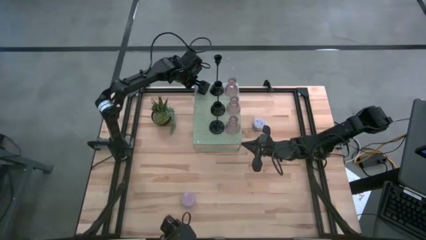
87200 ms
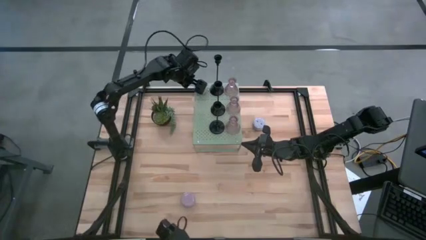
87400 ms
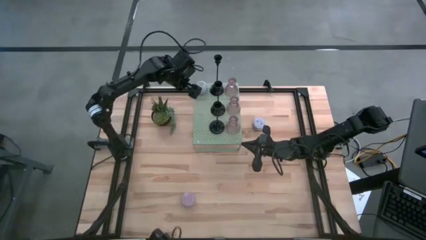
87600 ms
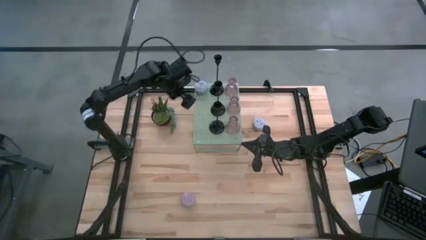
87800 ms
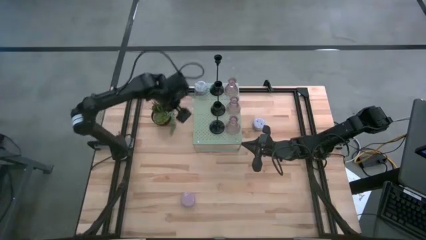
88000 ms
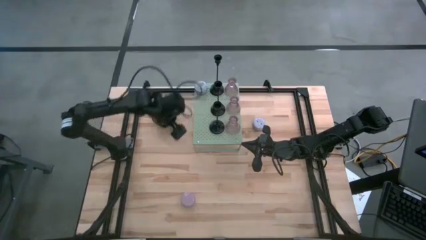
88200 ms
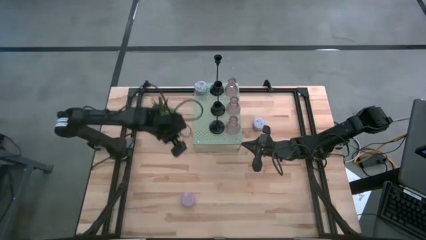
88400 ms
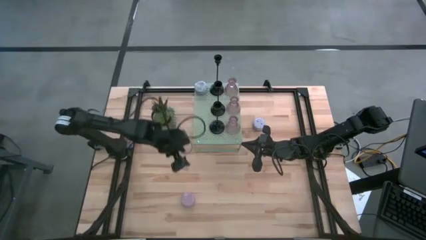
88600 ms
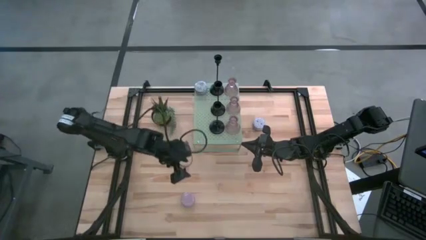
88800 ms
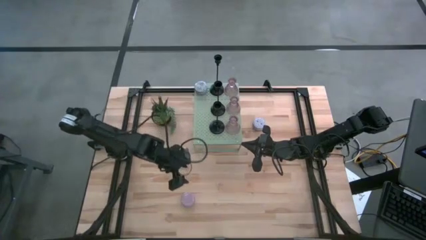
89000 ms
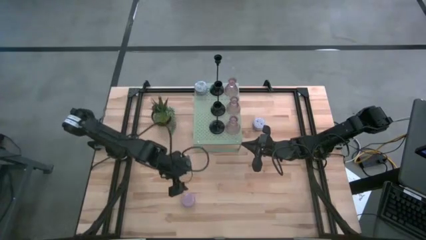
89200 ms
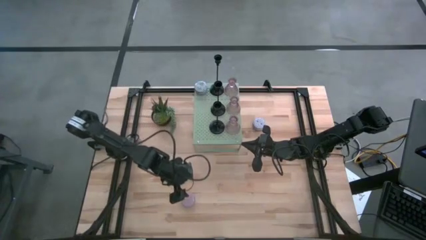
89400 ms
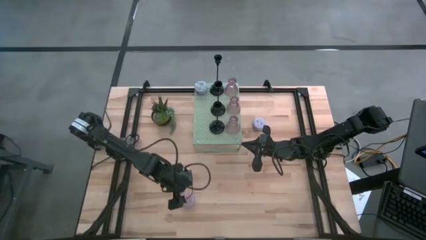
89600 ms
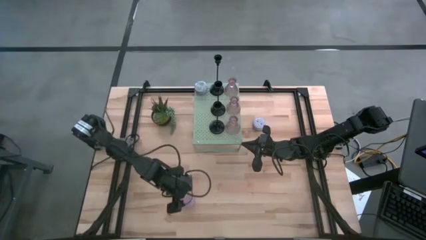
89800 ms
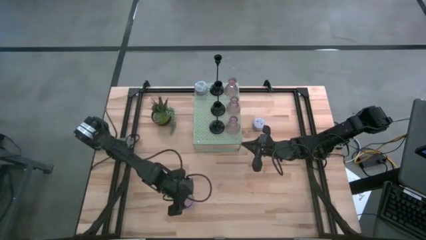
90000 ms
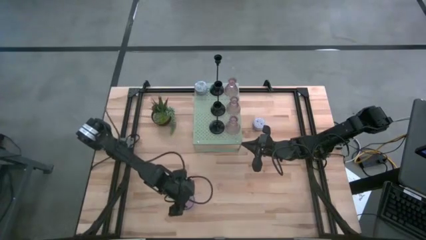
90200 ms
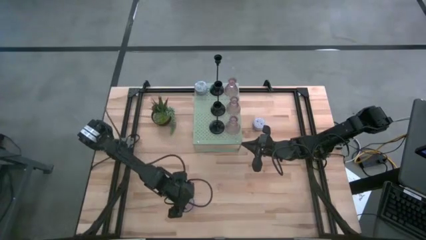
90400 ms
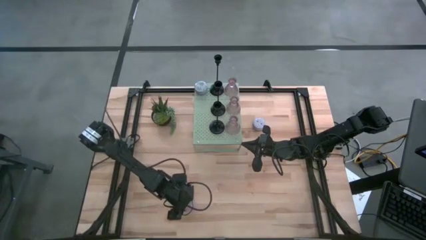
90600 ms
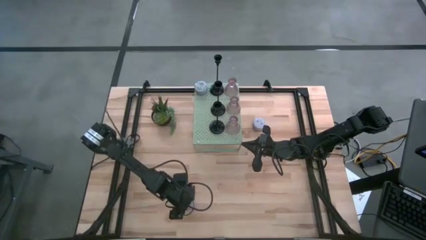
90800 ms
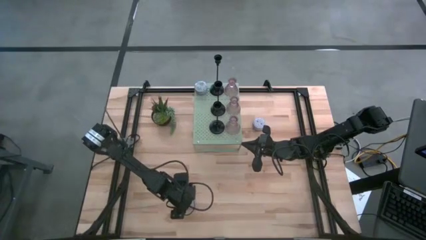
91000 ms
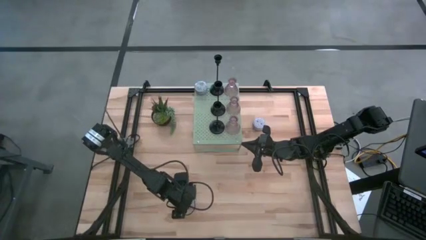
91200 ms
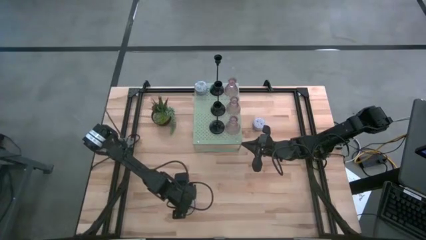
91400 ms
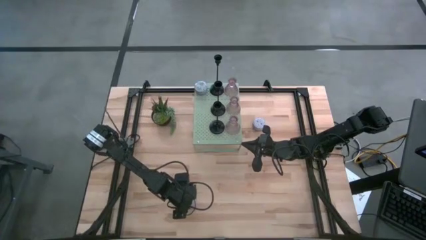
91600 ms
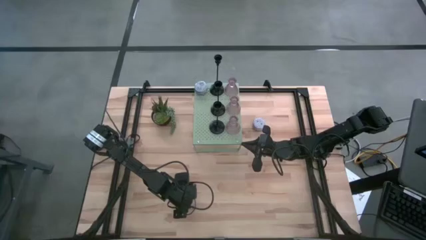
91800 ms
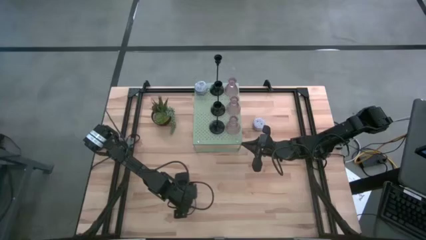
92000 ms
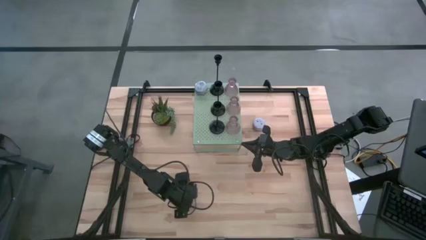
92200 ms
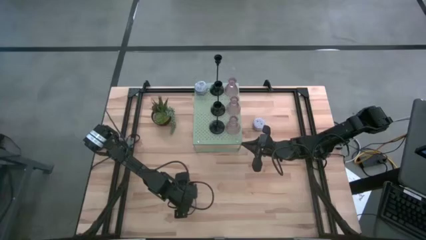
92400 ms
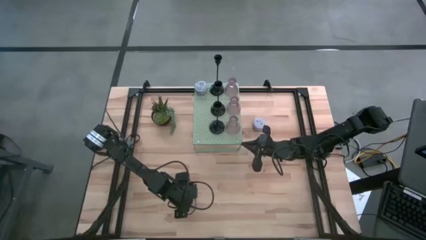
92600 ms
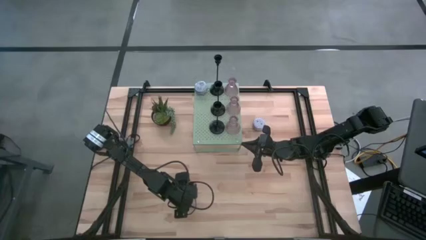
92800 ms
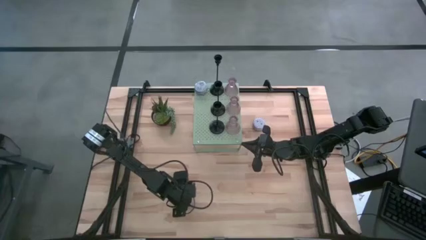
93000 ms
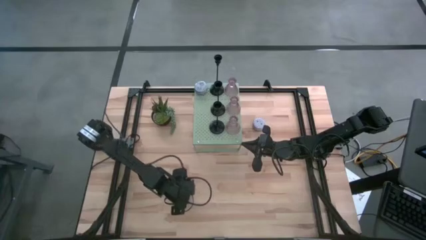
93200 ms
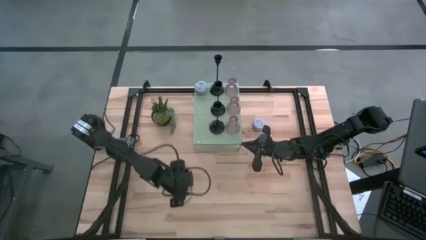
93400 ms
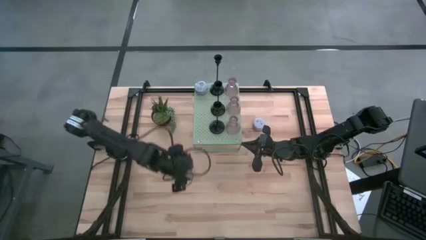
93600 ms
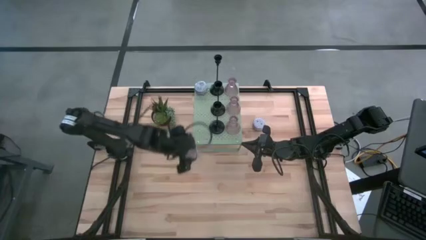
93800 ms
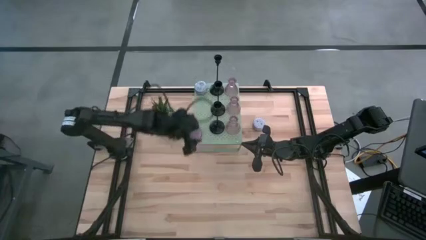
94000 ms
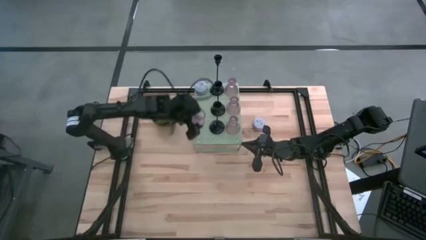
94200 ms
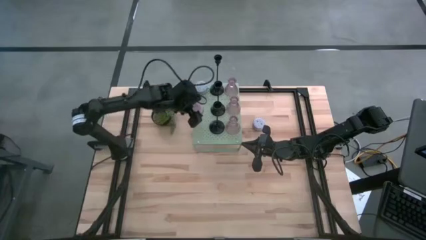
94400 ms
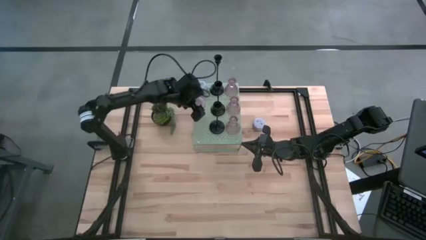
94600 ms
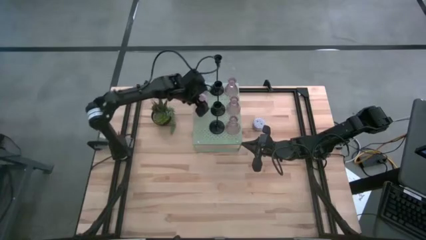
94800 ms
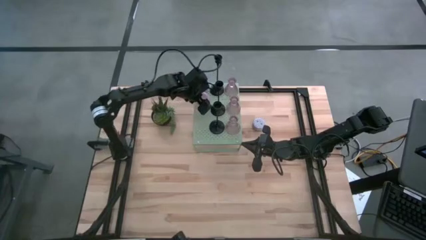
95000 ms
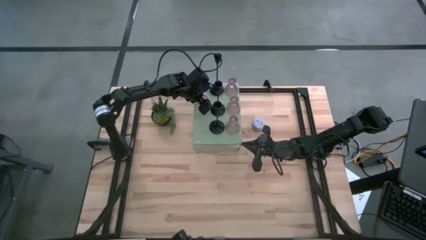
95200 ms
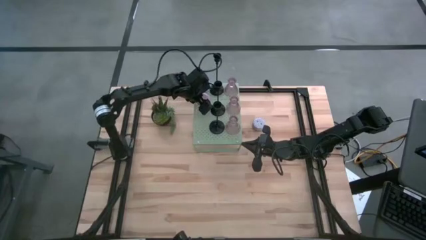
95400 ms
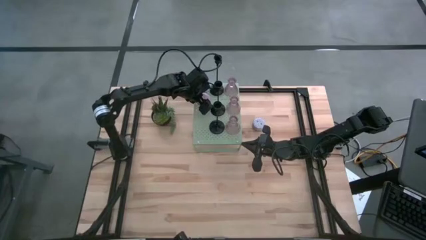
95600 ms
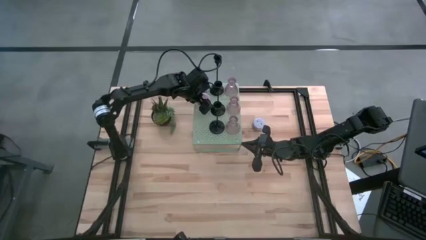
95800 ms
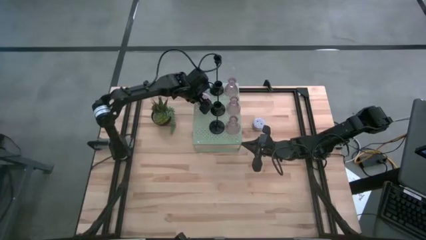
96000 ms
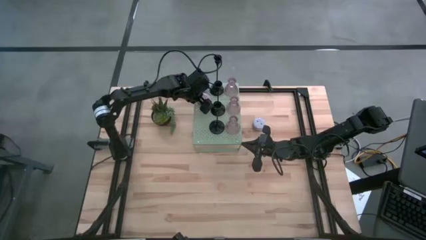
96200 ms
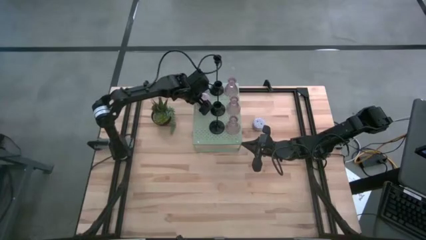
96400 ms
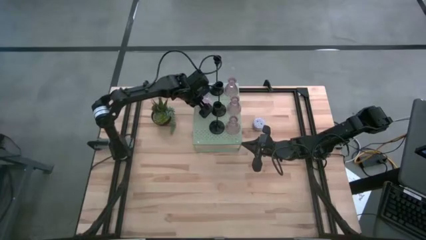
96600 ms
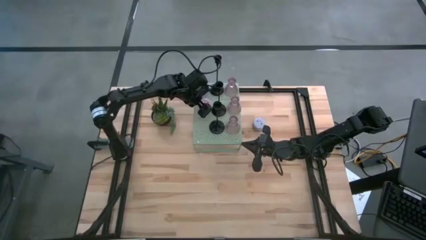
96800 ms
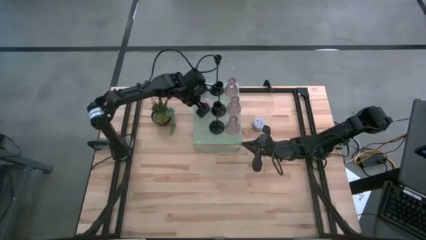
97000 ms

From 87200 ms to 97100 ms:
Task: Pick & Place candle stick holders
Put the pink patterned scented candle on the shelf
